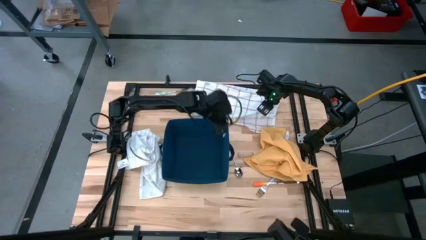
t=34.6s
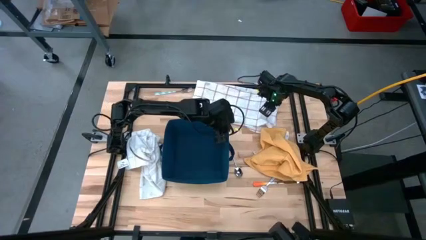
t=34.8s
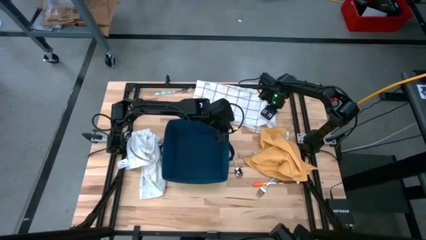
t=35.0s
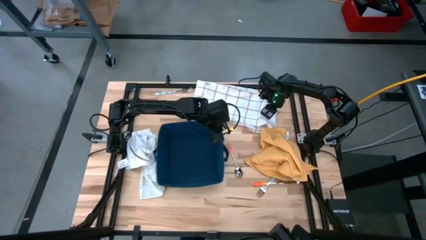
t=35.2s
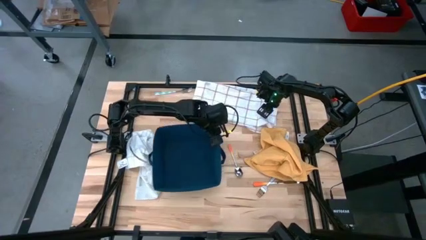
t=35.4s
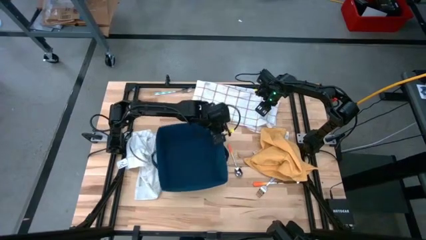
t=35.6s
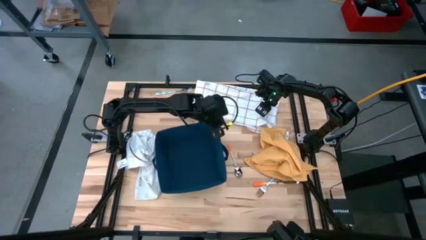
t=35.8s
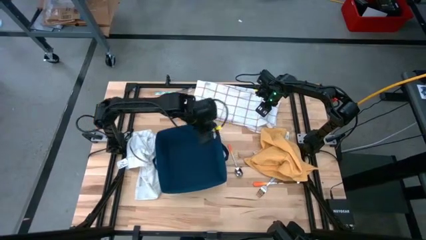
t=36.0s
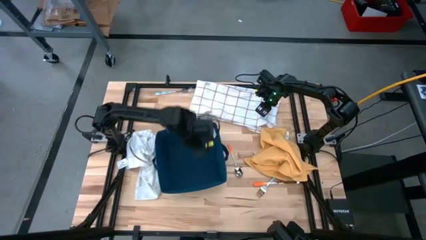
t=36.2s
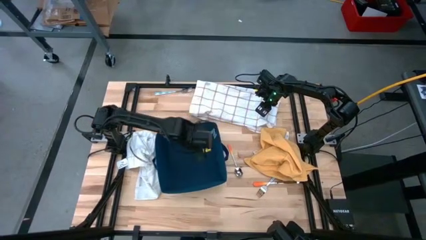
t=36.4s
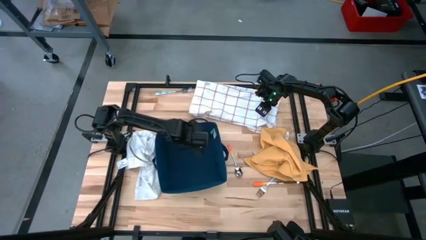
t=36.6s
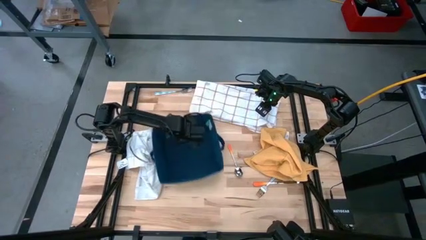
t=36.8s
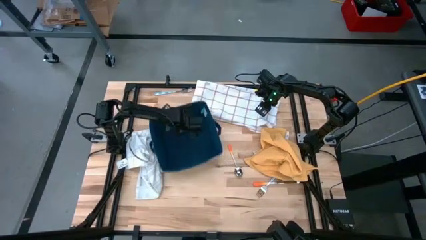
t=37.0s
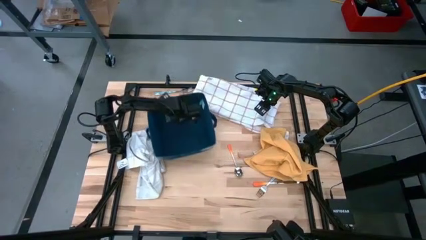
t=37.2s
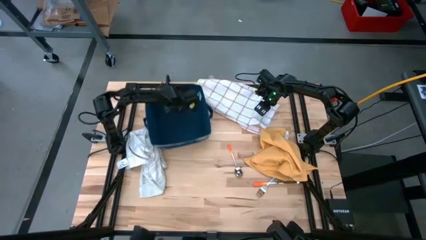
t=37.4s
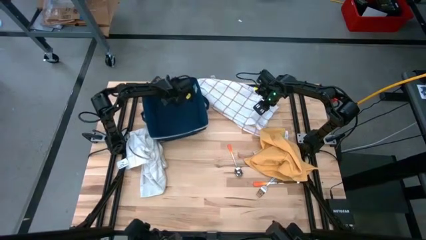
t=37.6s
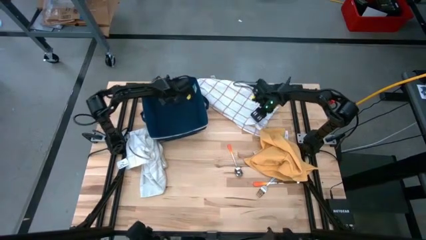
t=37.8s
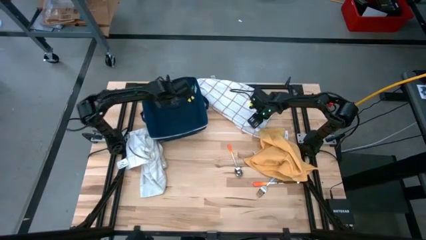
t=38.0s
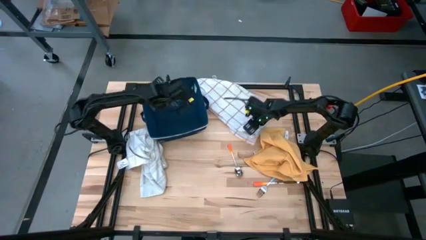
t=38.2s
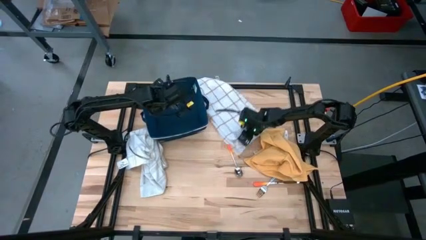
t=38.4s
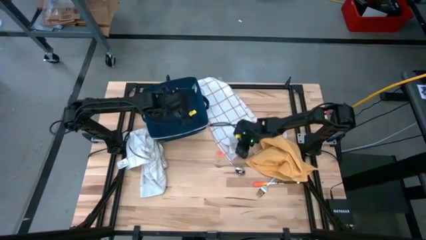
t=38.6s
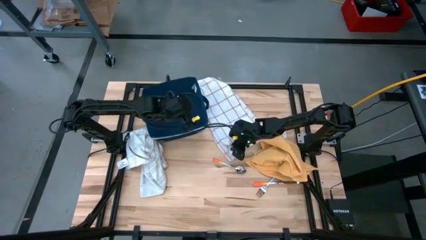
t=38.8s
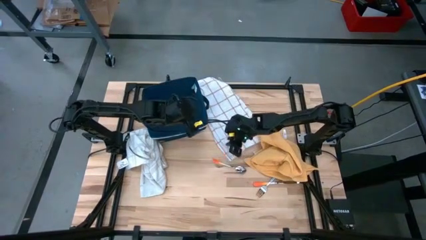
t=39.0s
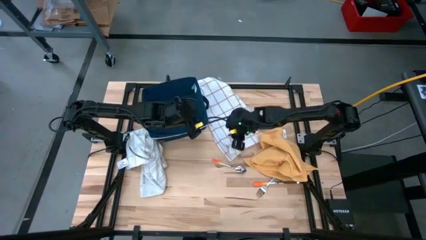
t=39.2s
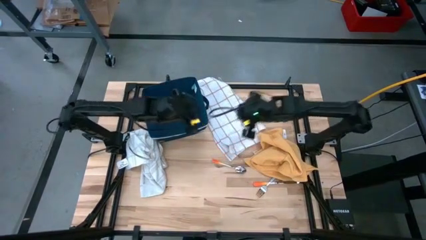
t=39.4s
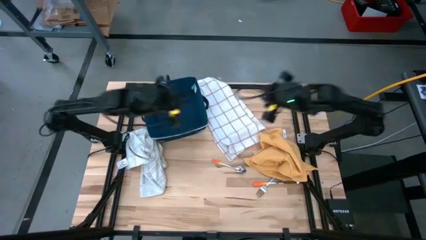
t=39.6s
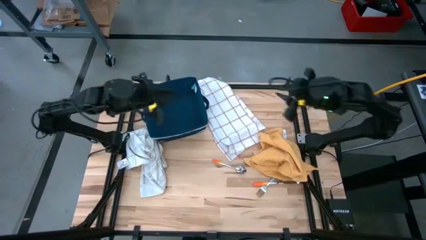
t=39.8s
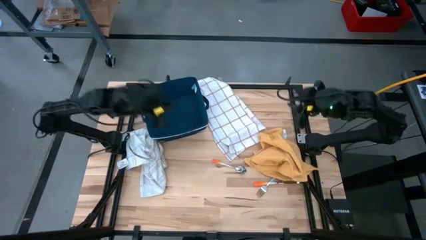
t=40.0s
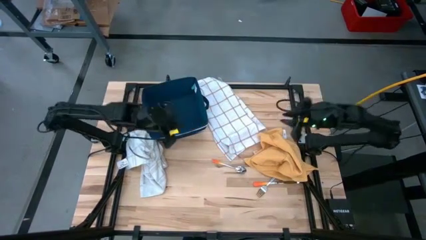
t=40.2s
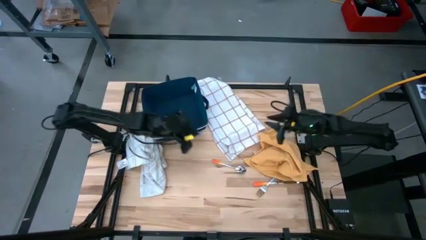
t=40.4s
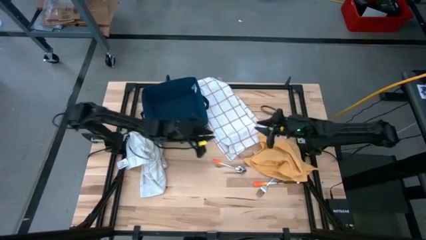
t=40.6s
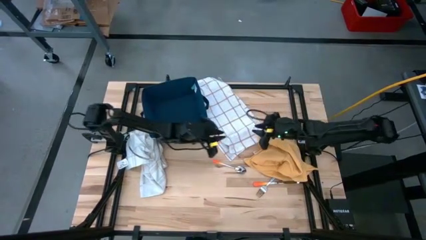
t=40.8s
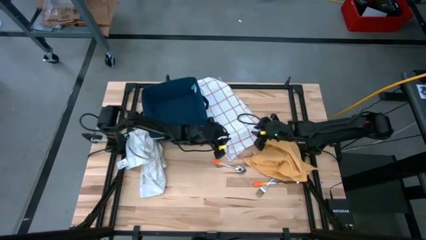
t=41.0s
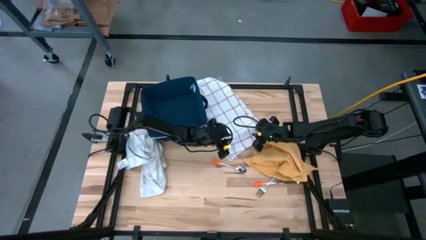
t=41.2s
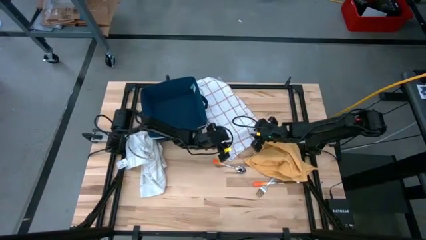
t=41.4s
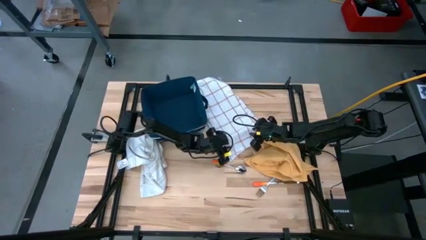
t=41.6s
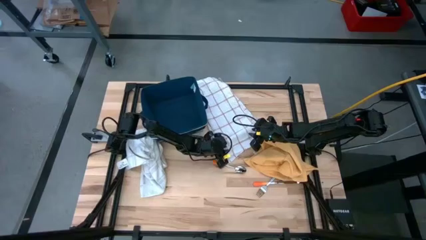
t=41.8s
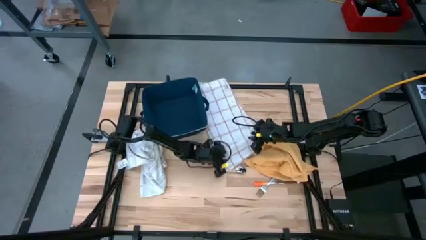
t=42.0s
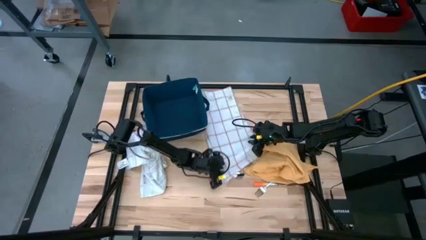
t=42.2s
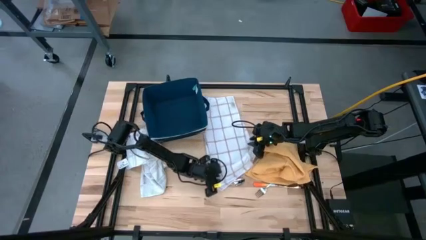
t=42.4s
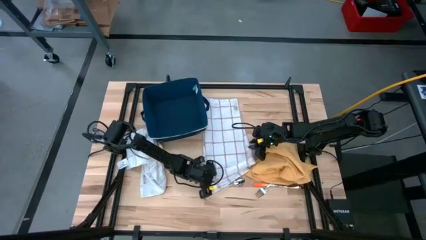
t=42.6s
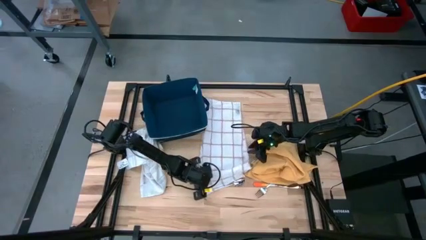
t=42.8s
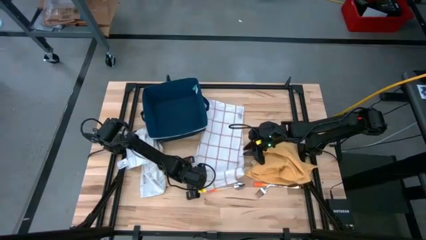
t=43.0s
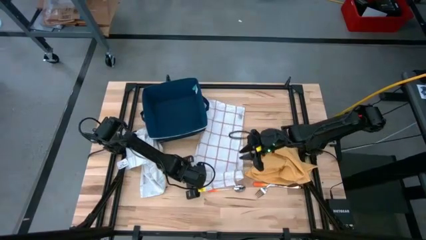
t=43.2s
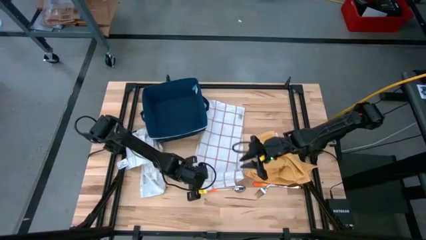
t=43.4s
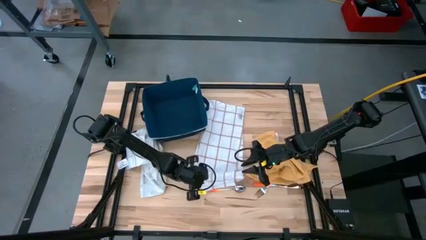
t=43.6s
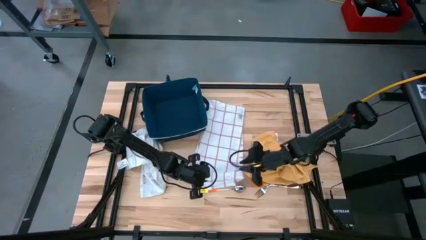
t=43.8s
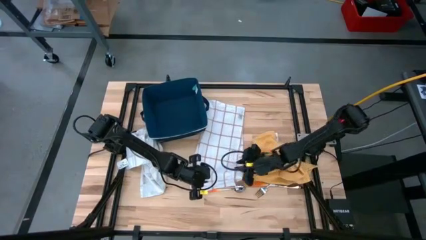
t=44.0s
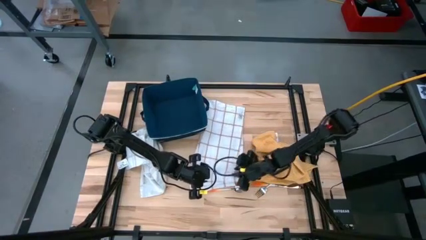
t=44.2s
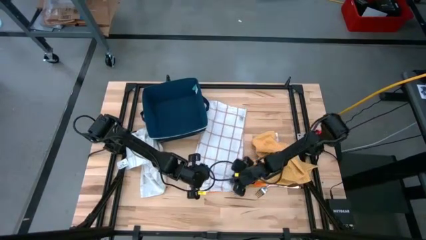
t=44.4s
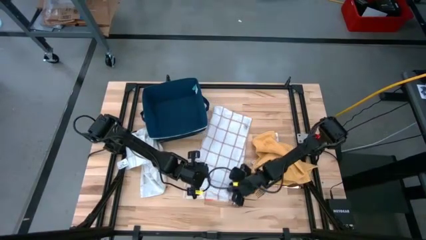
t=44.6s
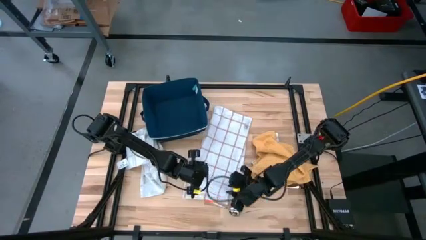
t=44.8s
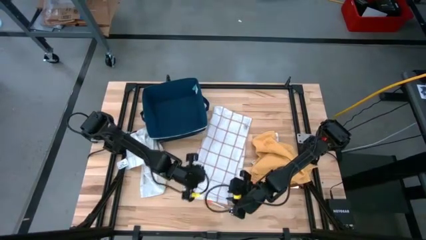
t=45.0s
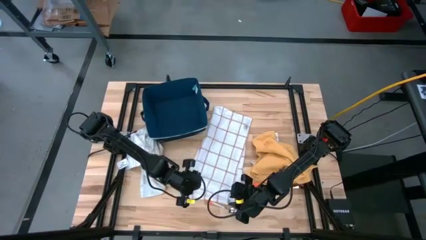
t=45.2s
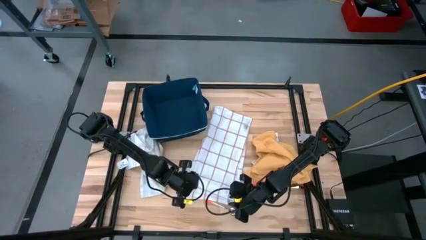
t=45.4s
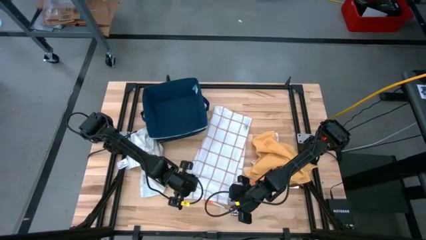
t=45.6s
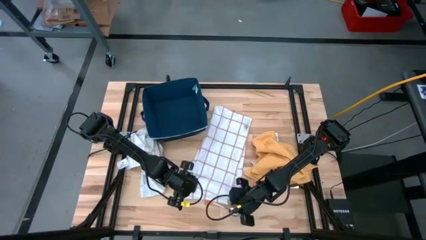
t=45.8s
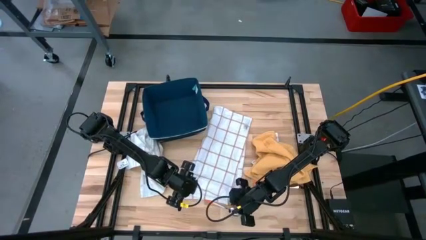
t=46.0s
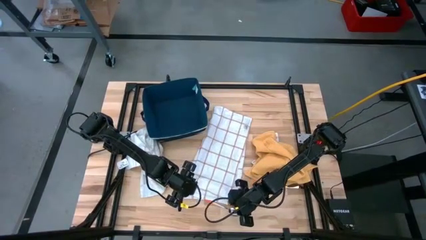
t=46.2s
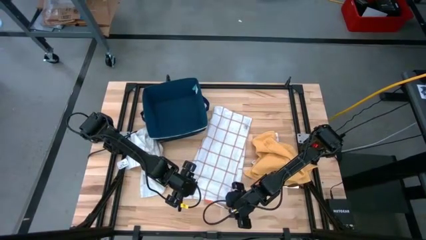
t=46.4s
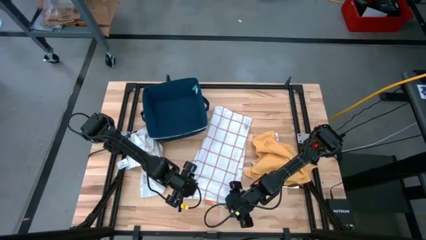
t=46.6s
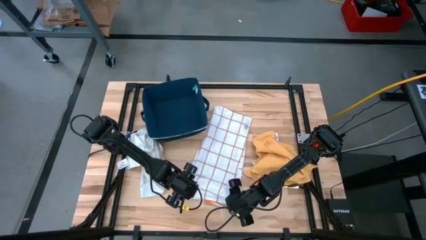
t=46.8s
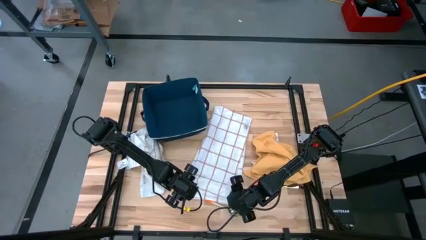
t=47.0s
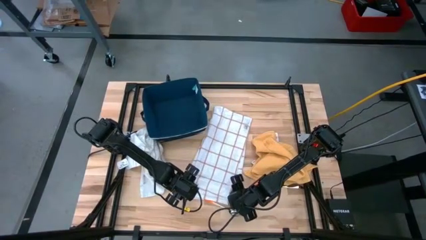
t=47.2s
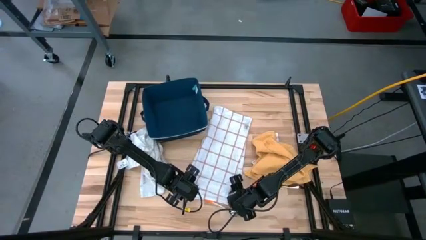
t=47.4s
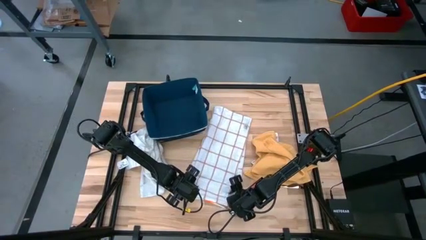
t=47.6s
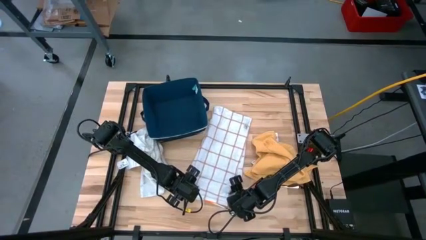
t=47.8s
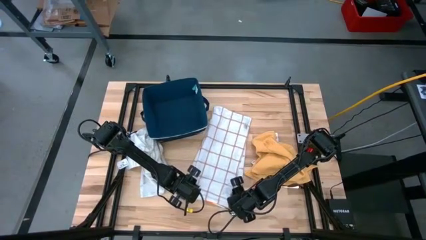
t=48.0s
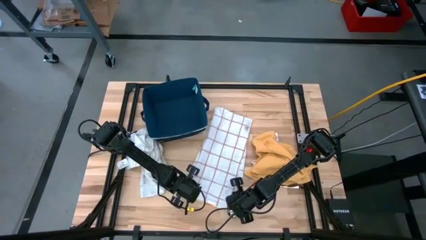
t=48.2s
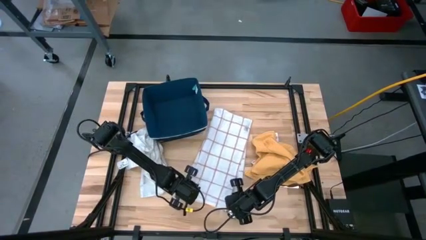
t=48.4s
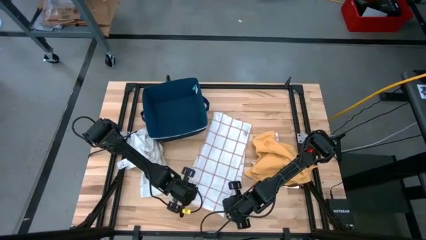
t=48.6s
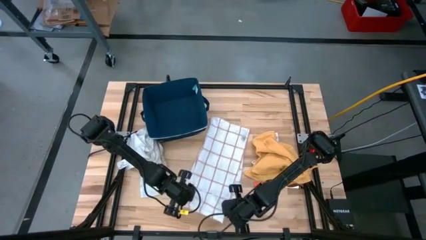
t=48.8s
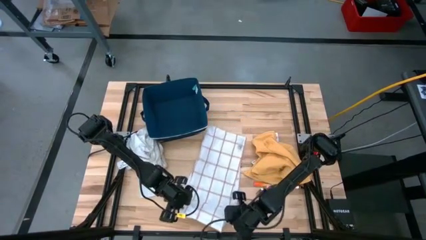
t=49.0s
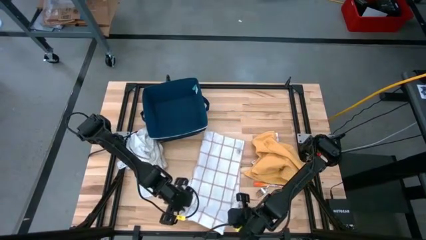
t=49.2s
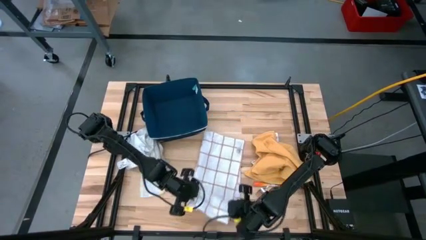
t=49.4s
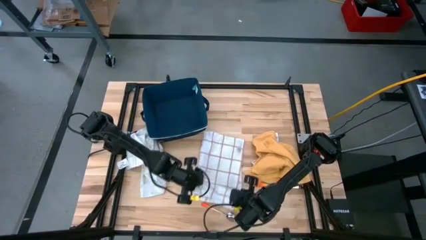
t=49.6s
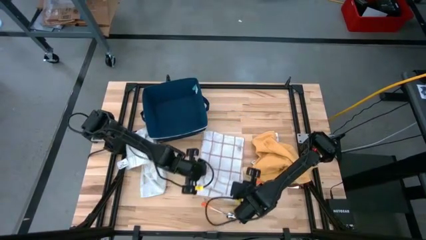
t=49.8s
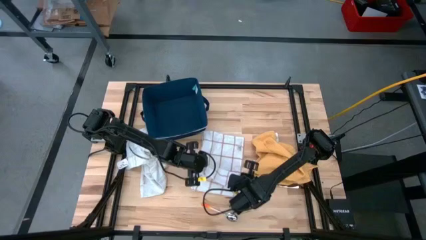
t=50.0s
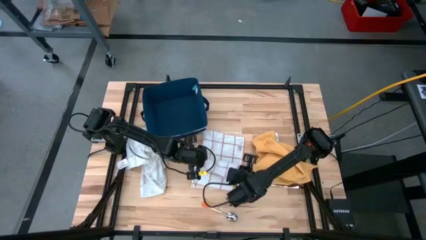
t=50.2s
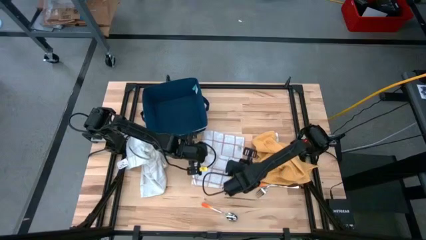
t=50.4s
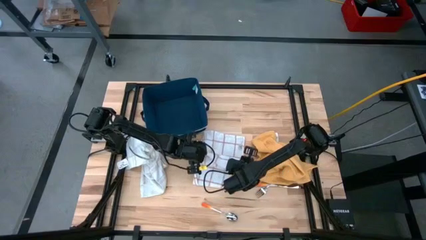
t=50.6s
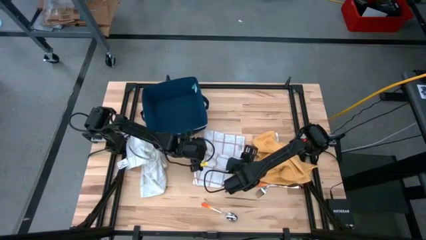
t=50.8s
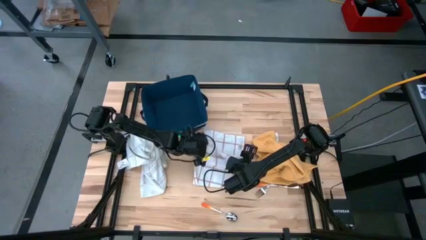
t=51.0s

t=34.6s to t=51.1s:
Task: Fold towel
Fold the right white patterned towel
